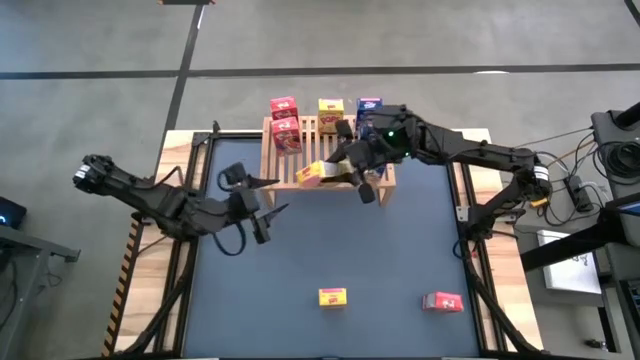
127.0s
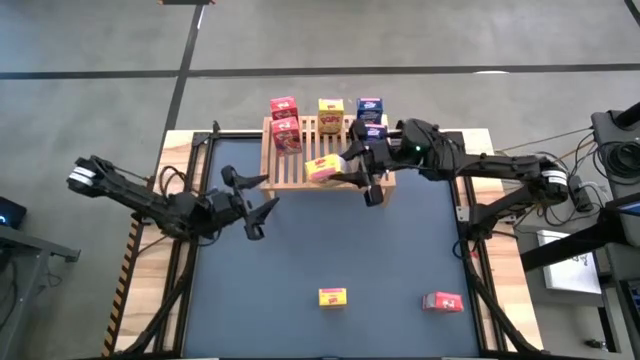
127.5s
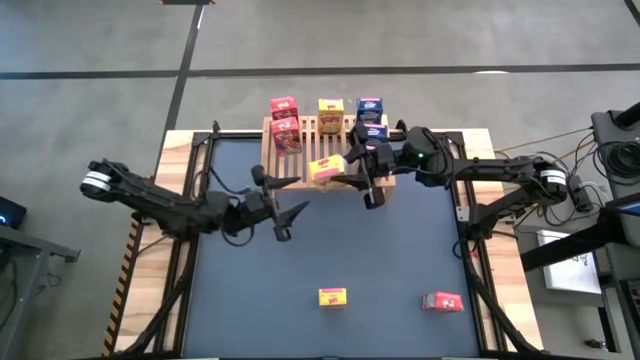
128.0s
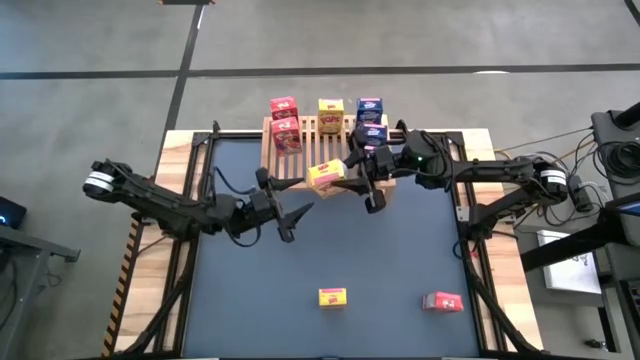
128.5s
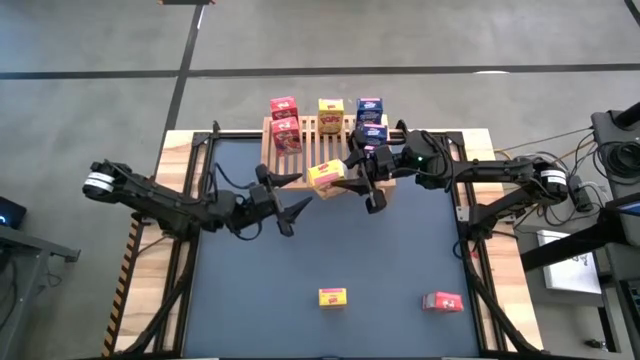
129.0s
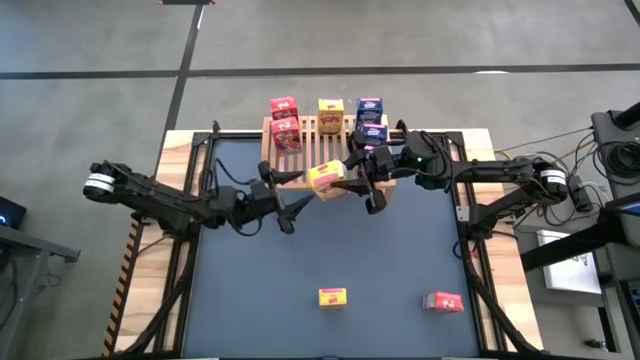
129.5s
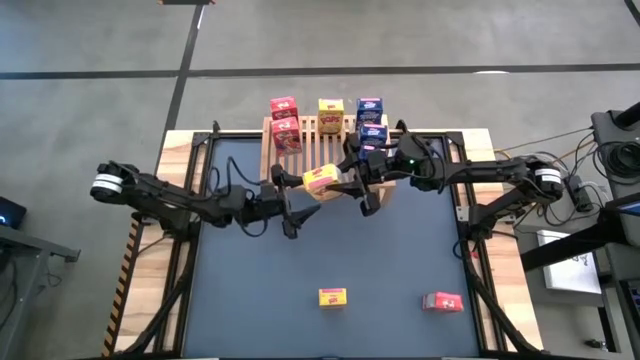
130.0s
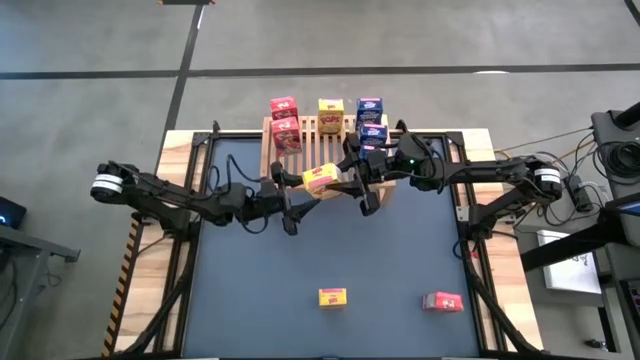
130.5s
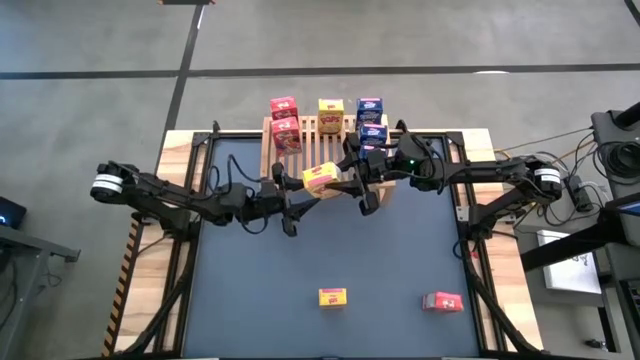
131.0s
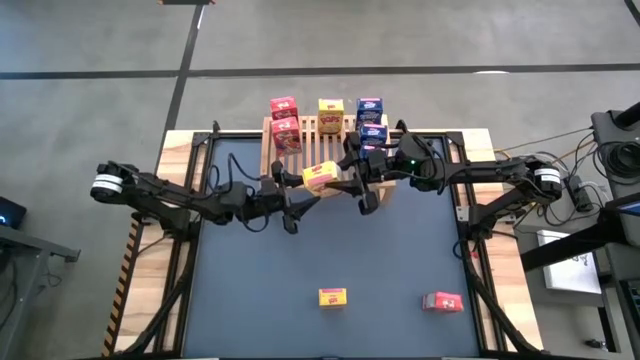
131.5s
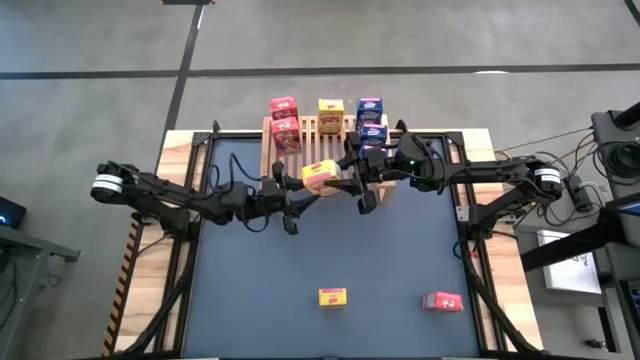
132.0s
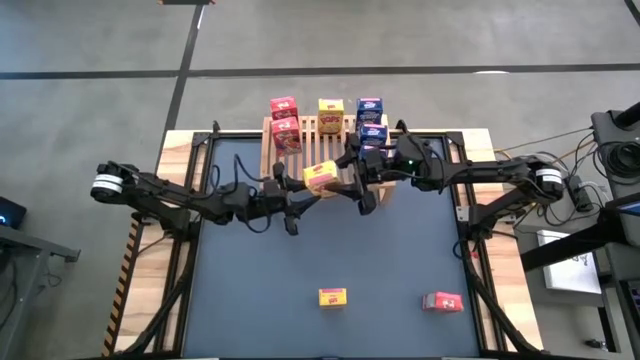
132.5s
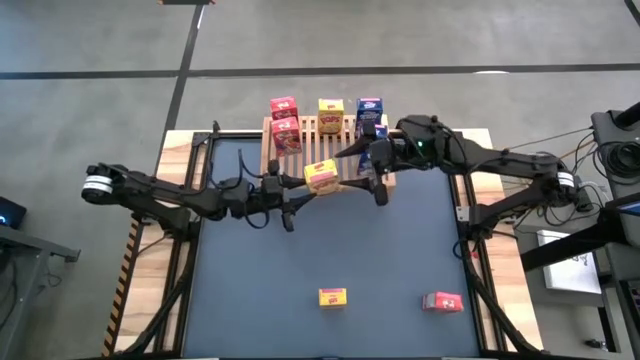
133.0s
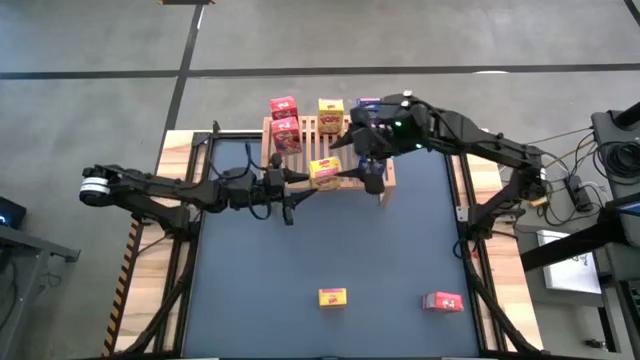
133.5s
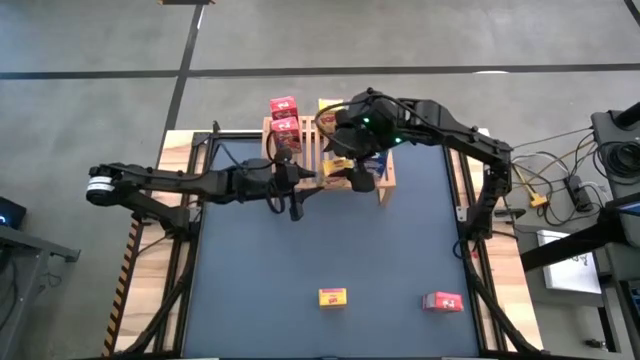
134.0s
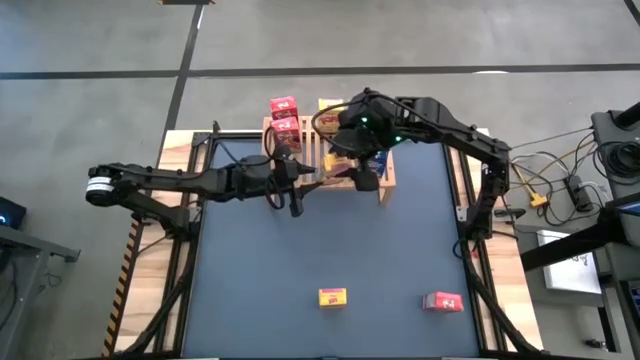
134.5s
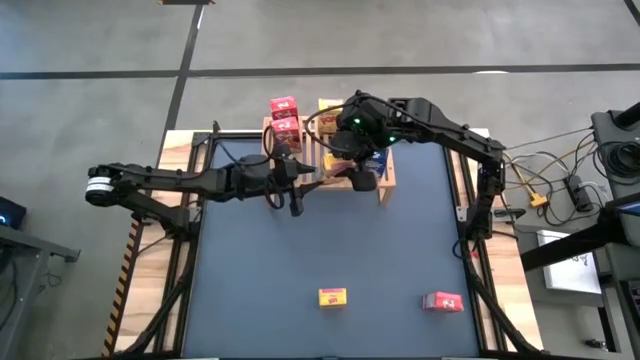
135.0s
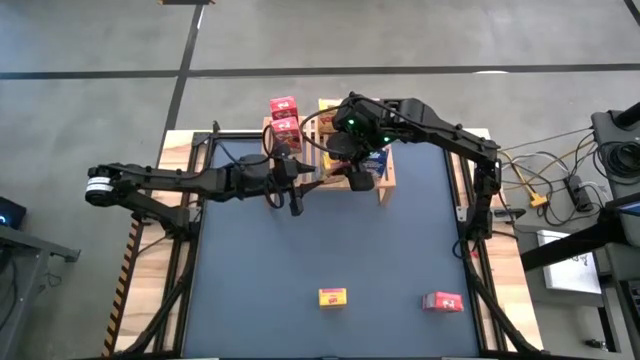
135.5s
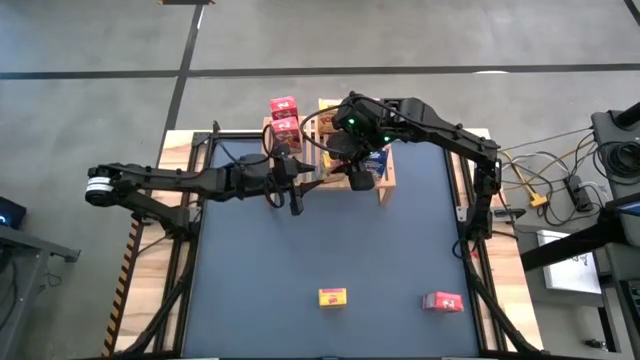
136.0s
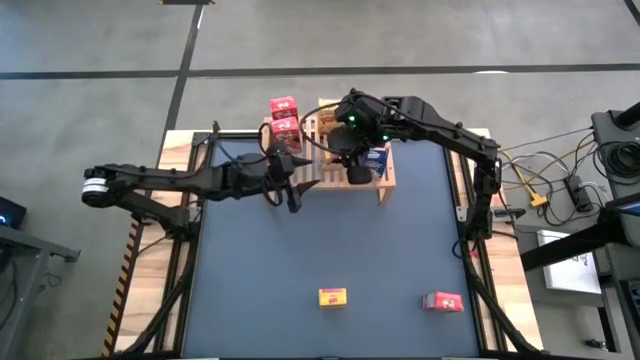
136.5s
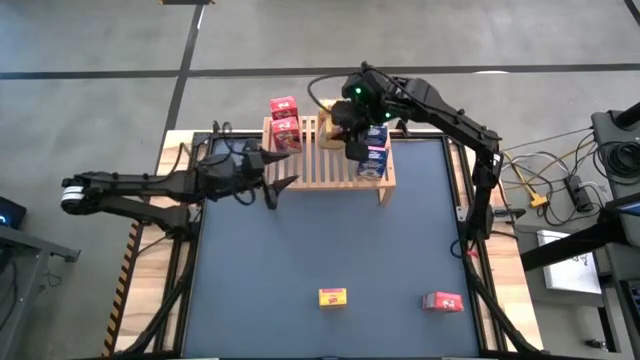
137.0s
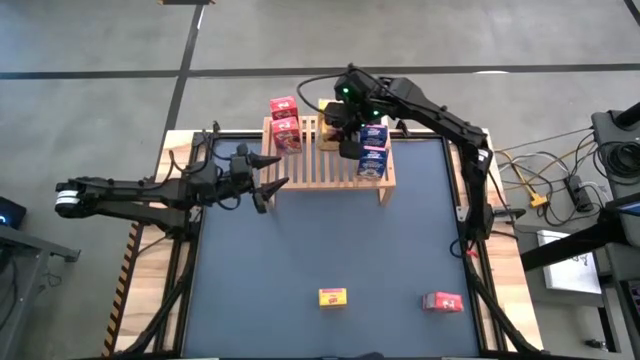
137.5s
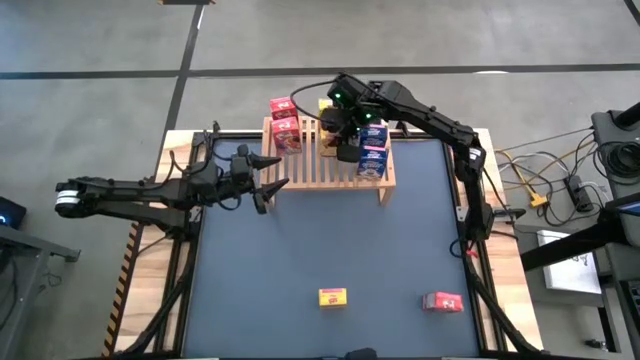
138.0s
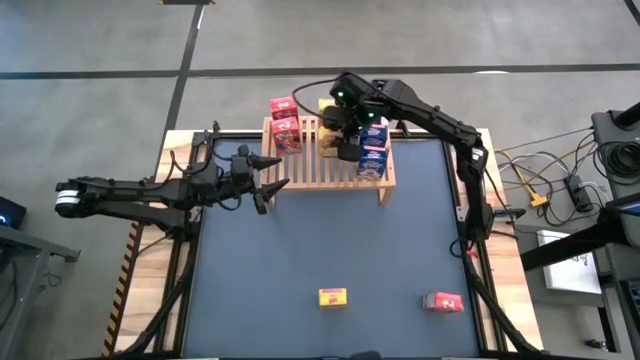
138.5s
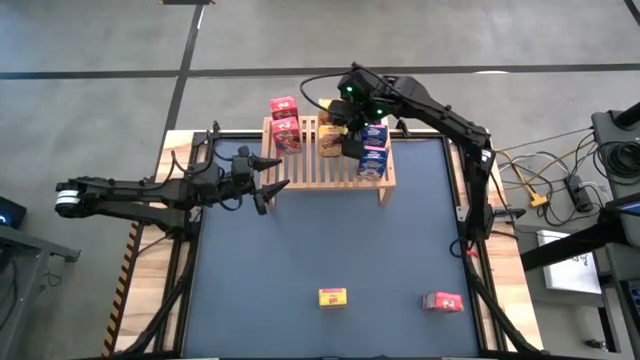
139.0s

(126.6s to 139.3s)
Task: Stack cereal on shelf
Put the left yellow cereal box on the shelf aligned with the yellow cereal box

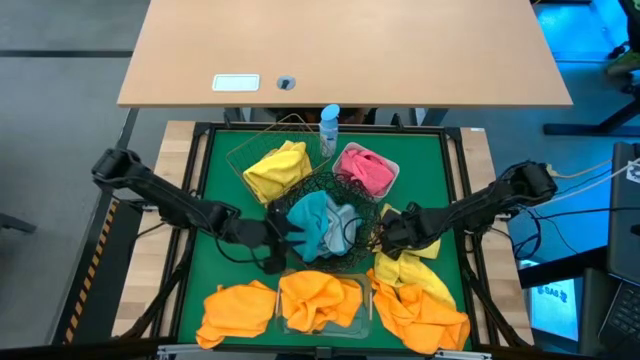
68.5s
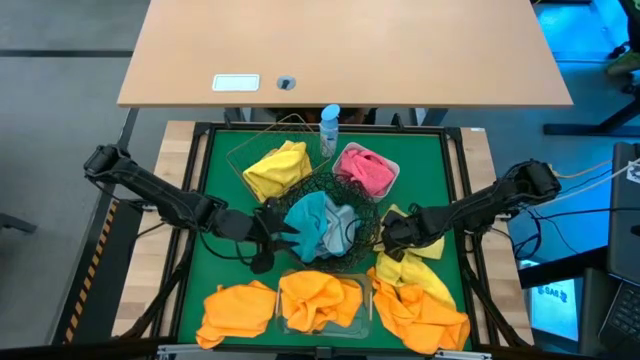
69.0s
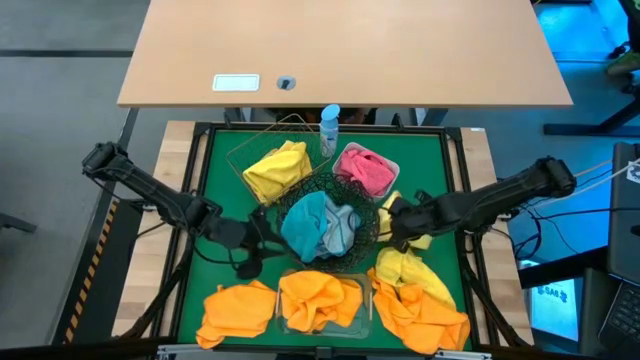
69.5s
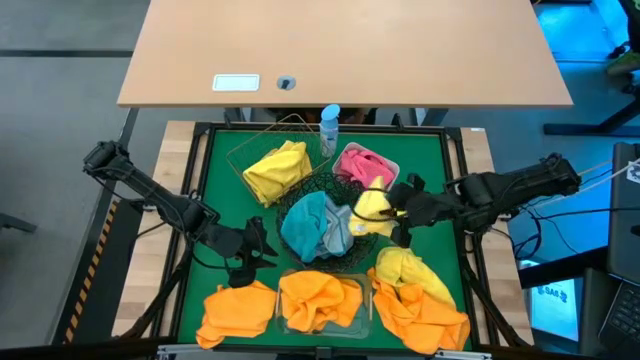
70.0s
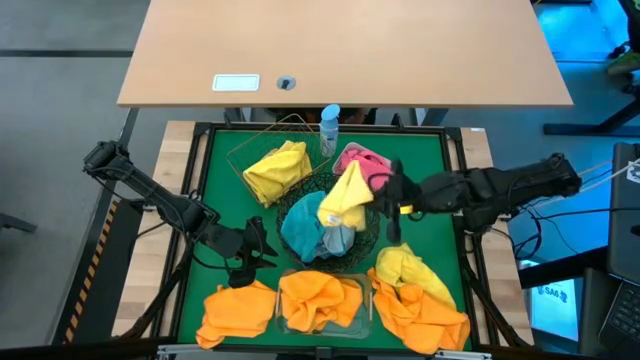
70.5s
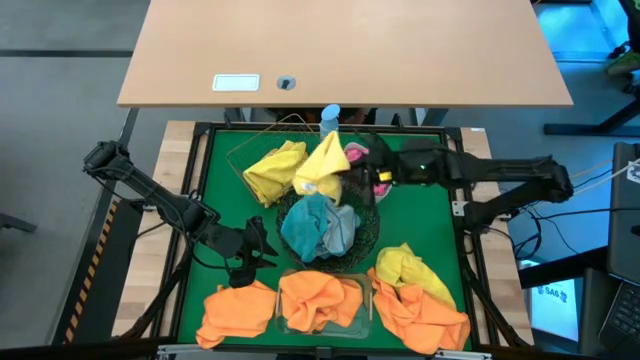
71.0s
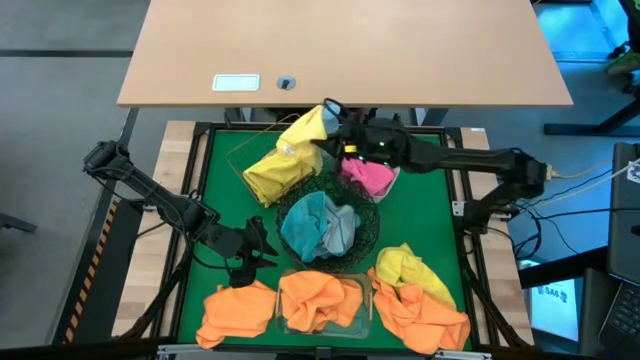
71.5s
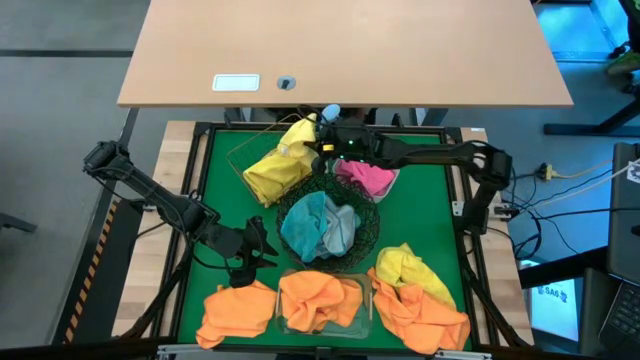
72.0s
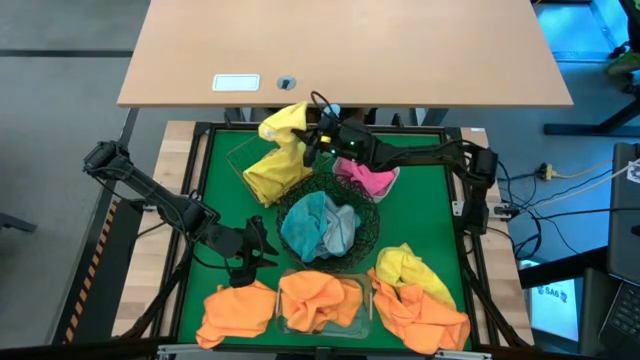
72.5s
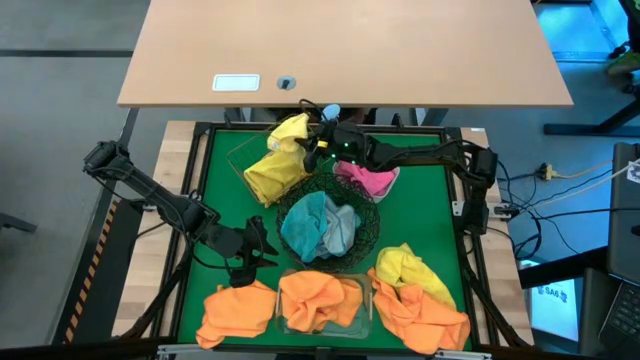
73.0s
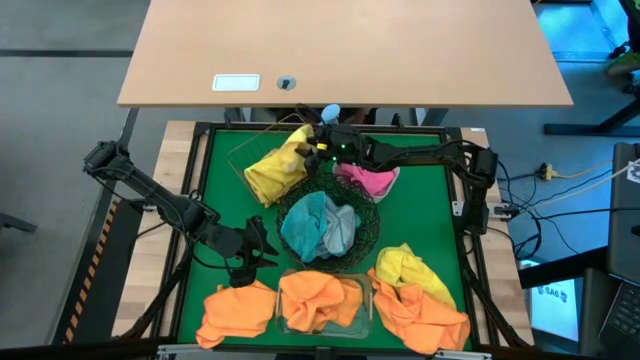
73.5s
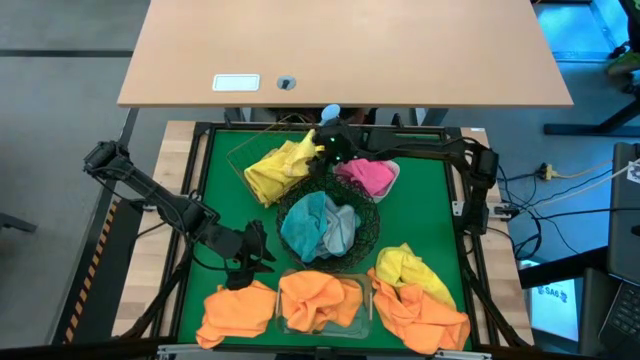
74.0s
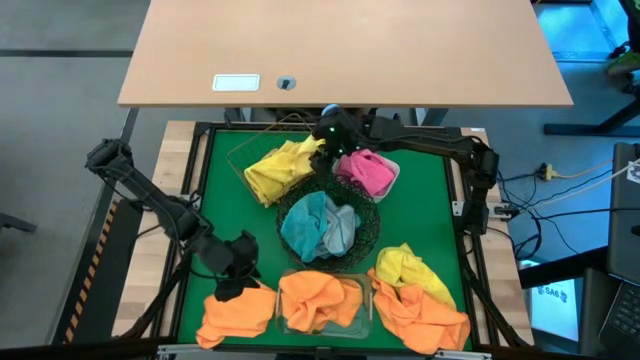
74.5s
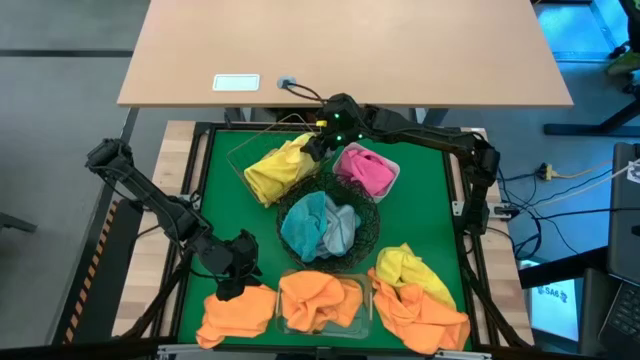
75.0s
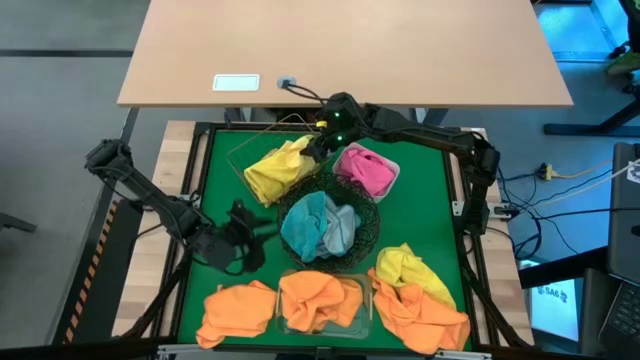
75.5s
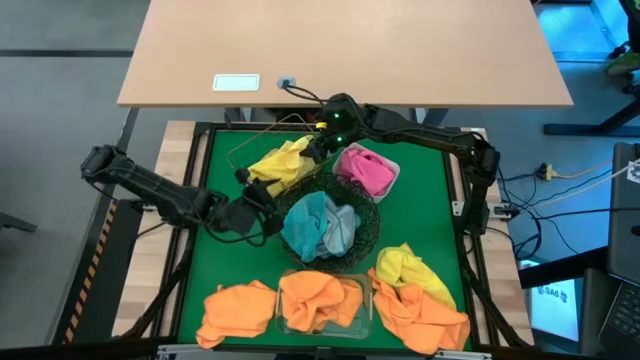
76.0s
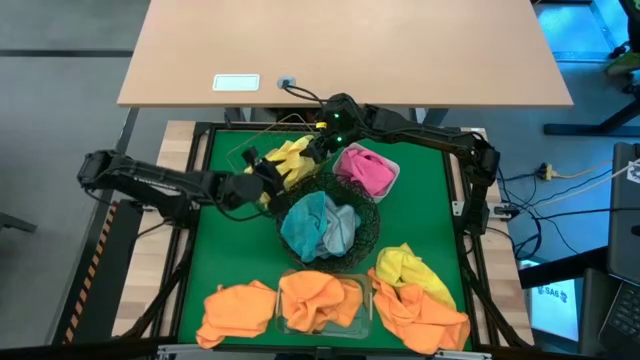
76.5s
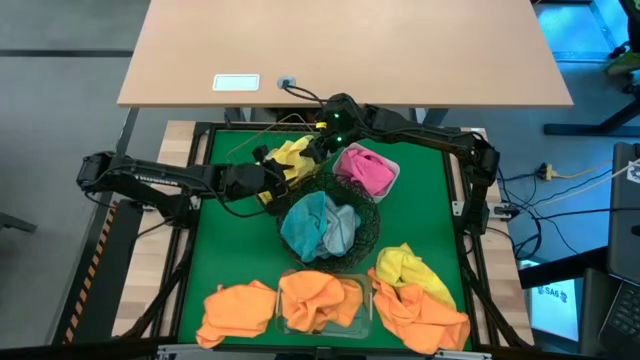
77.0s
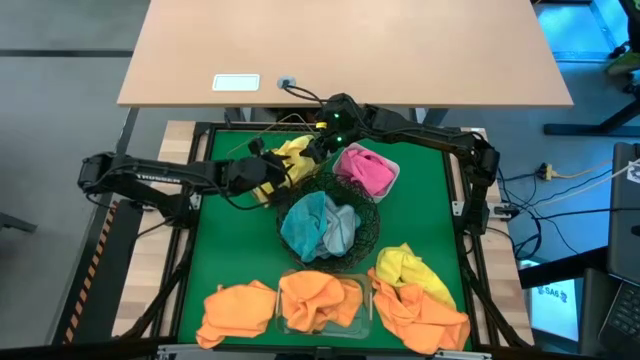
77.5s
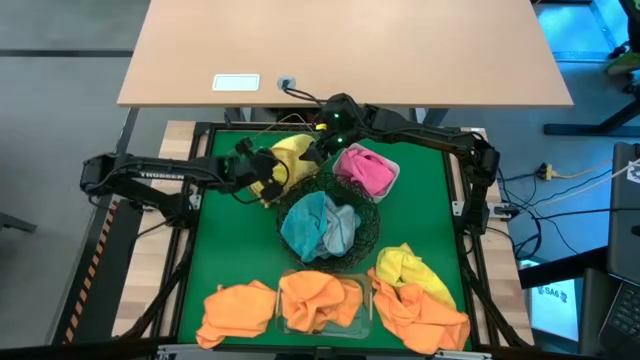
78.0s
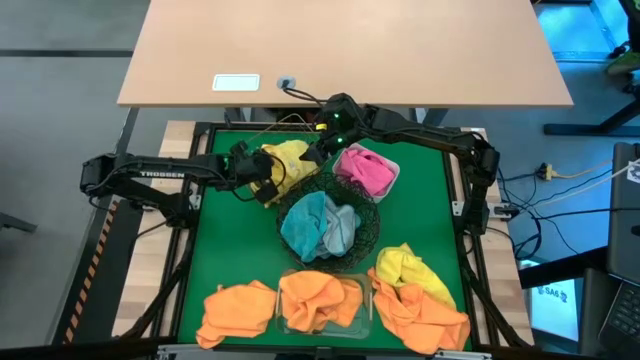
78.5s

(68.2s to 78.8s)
Task: Sort microfiber towel by color & place in baskets
Put the yellow microfiber towel into the brown wire basket
